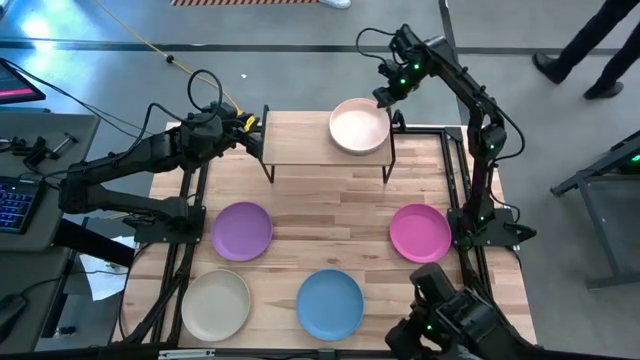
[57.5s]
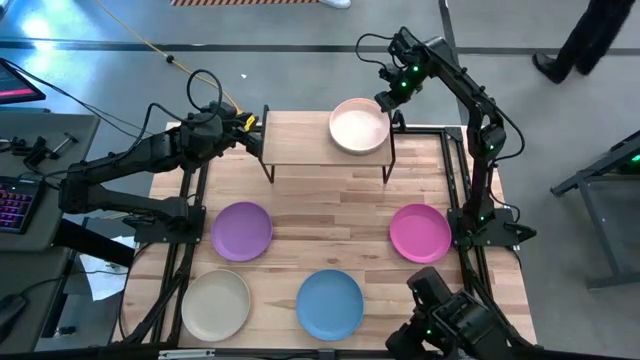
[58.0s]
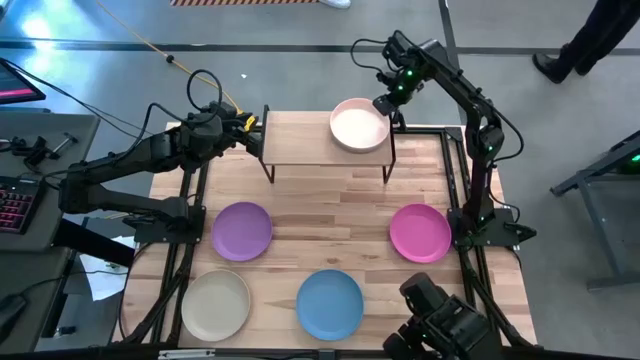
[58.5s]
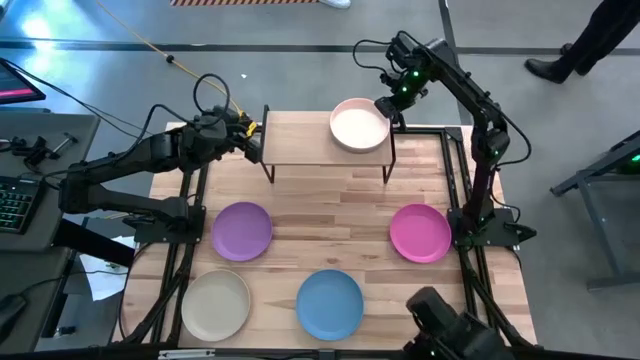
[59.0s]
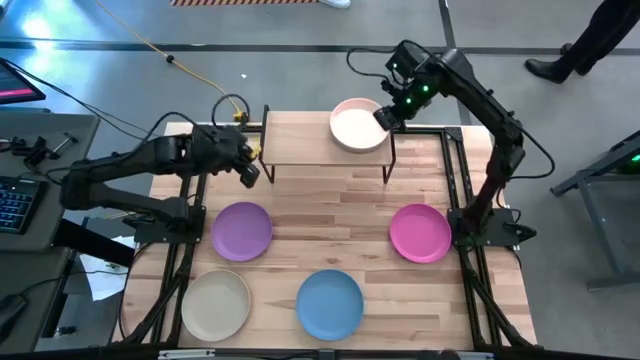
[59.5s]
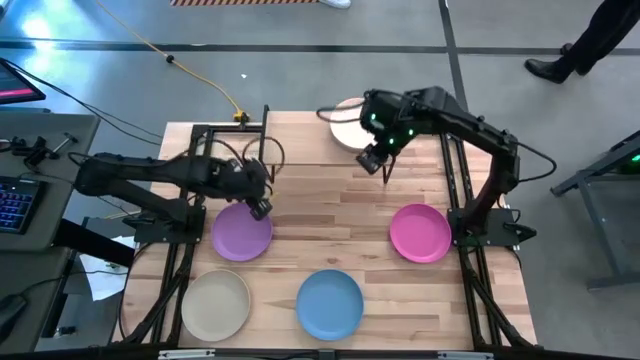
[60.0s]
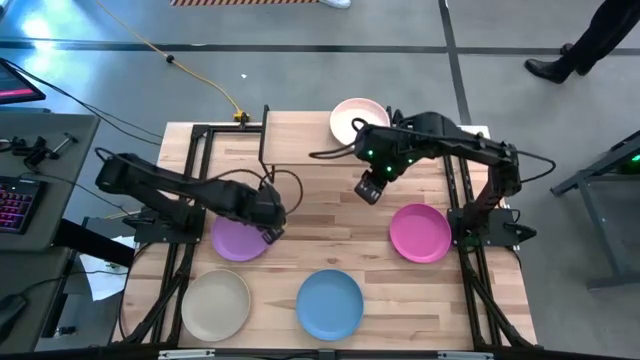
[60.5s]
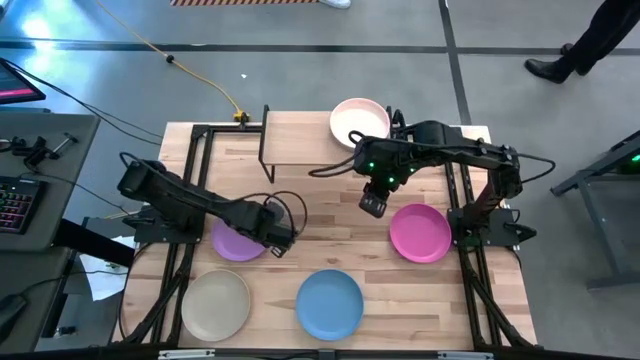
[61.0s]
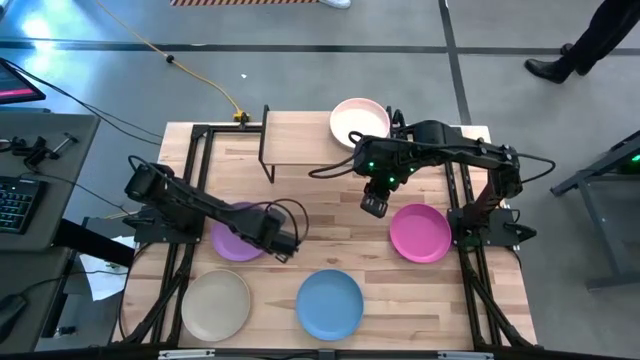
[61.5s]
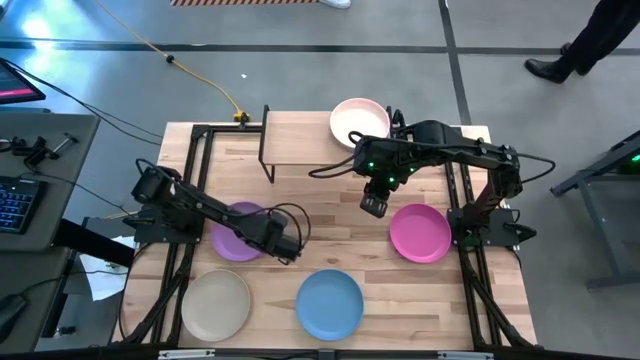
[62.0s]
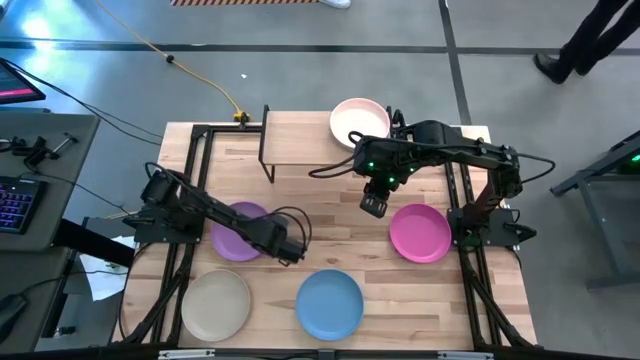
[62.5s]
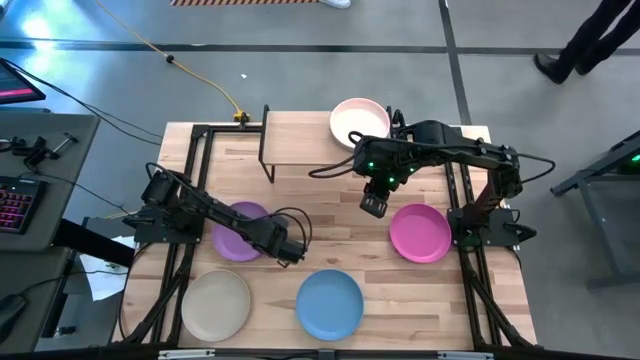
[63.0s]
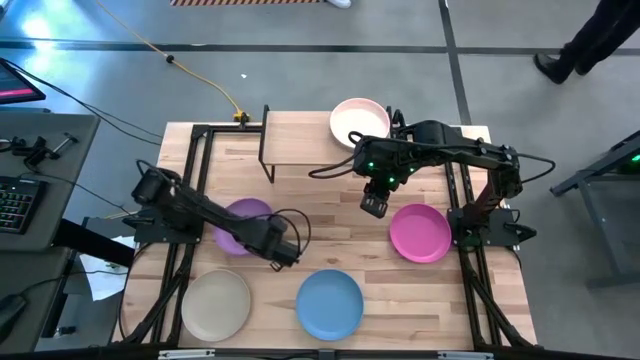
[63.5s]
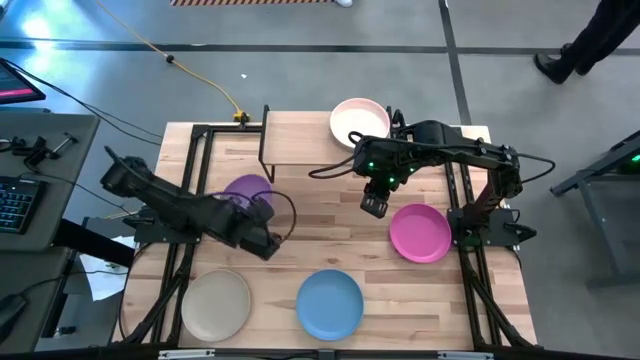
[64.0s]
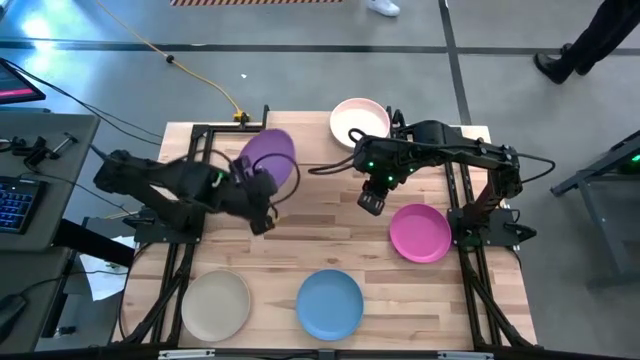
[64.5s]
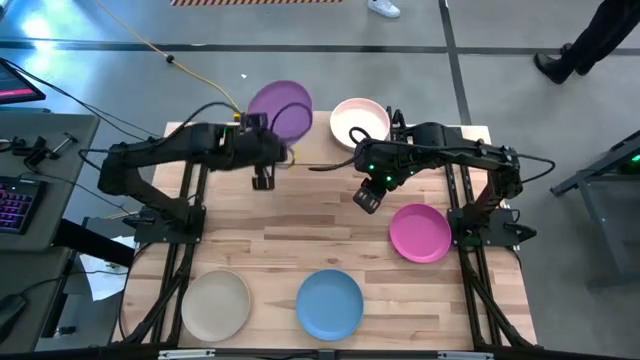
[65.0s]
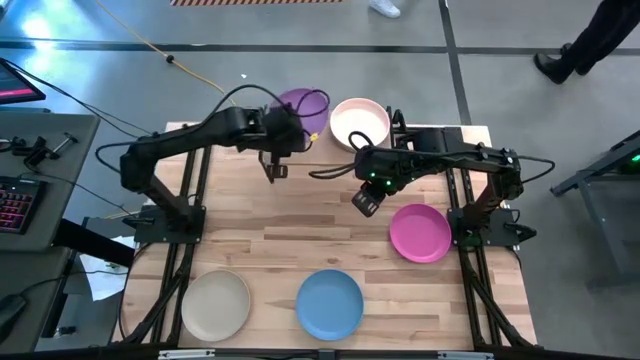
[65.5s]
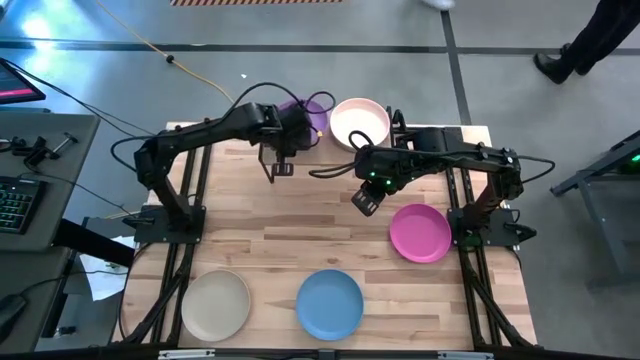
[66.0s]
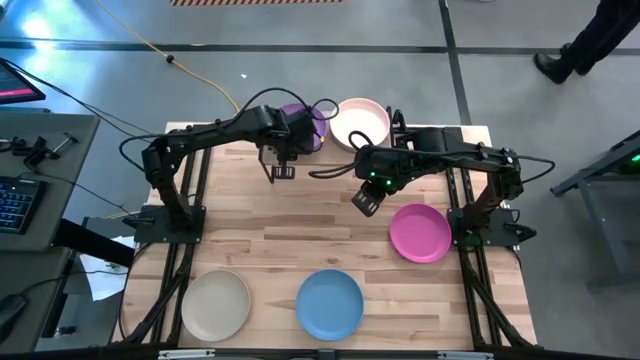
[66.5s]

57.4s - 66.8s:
Task: Place and stack plates onto a shelf
Put the purple plate on the shelf to the left of the piled plates

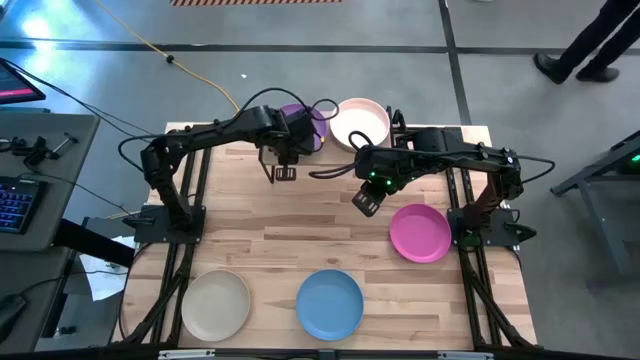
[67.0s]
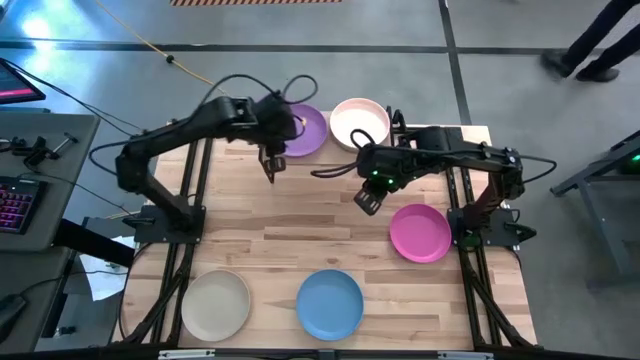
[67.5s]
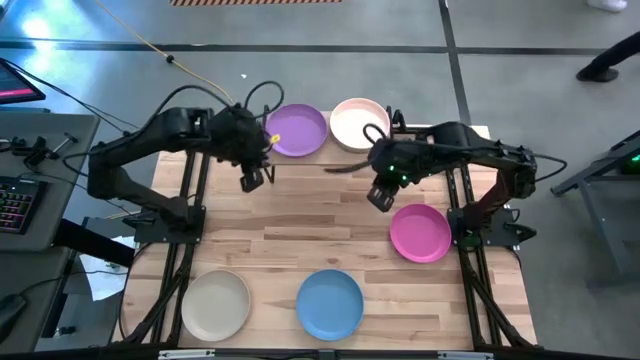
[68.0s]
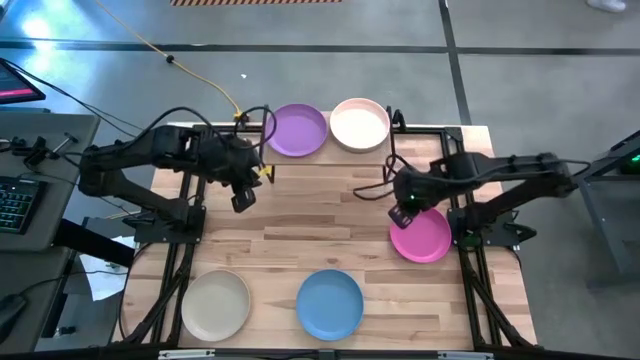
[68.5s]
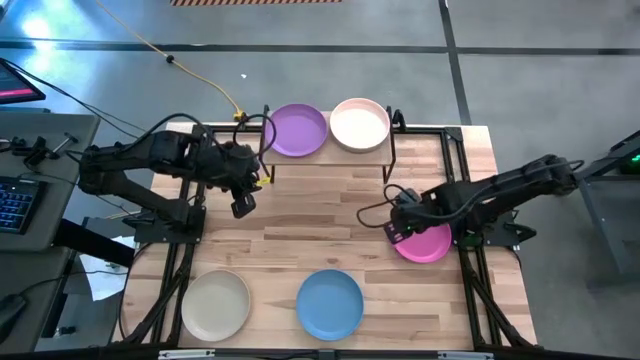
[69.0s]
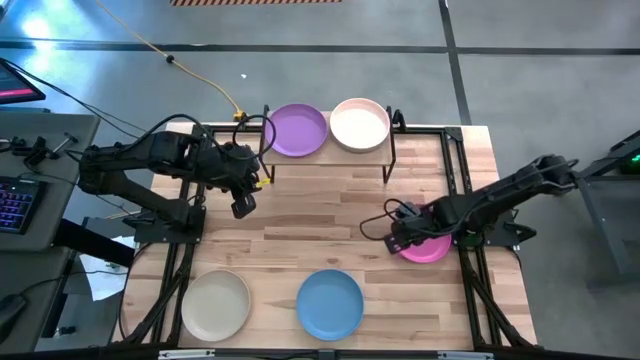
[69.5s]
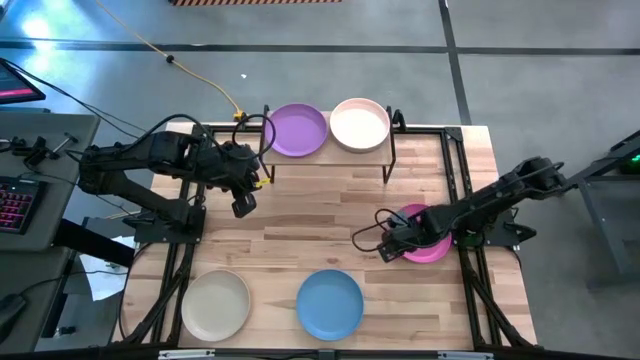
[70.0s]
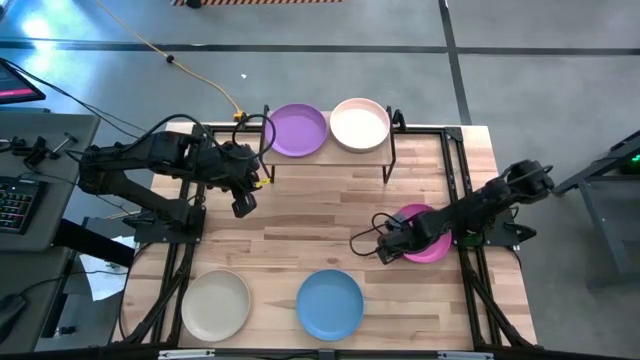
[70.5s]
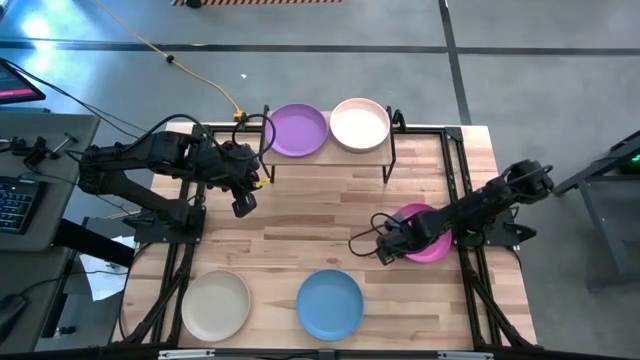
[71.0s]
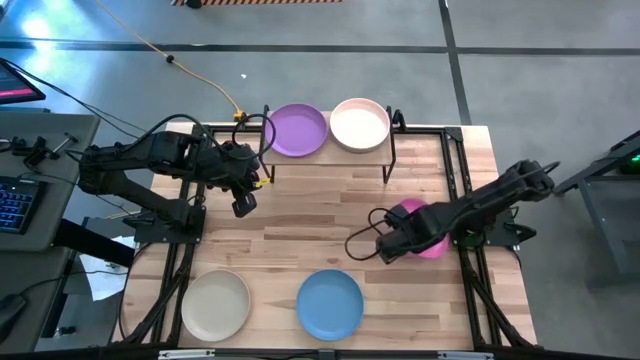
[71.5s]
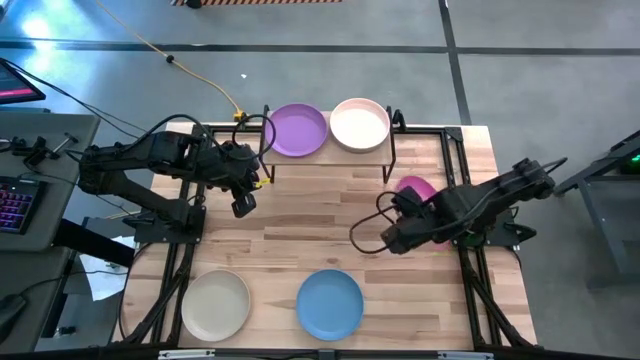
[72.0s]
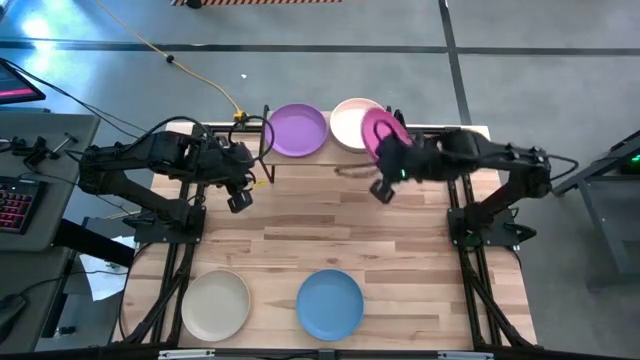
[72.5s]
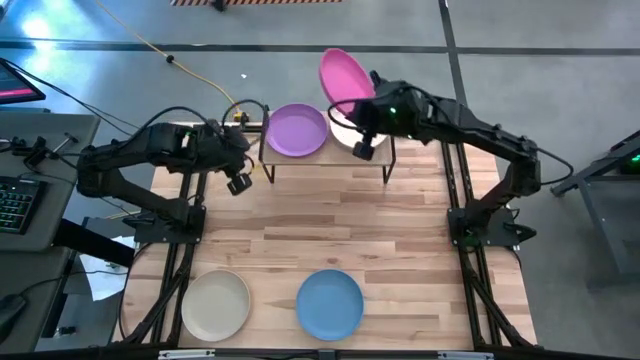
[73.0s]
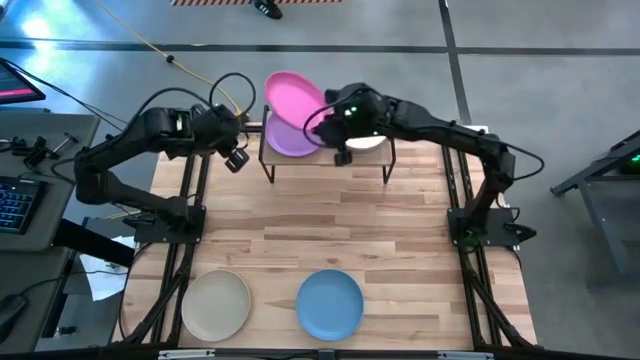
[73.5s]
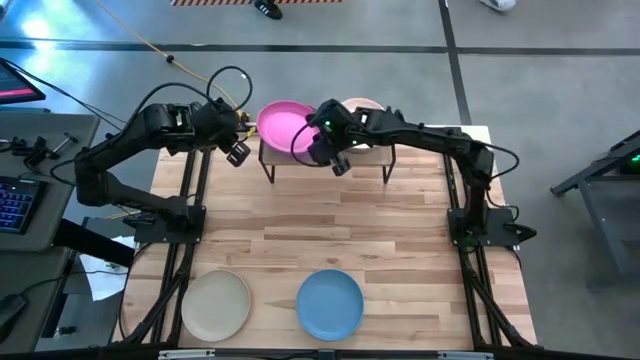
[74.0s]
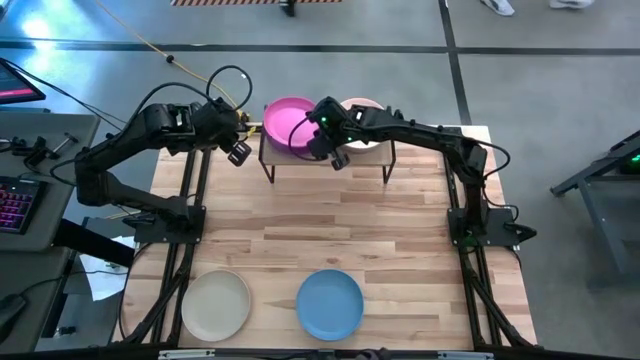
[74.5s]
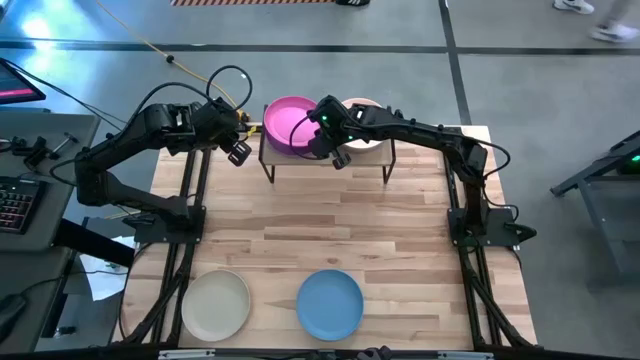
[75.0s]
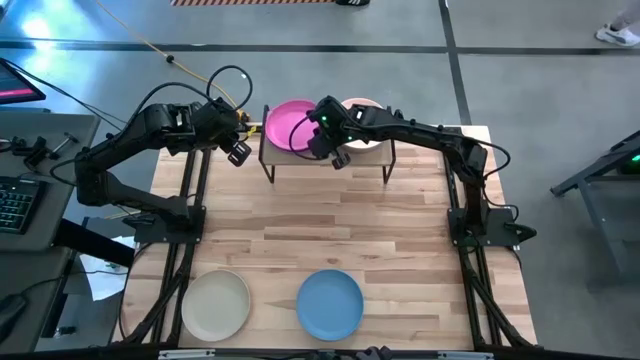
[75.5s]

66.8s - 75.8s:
Stack the pink plate on top of the purple plate on the shelf

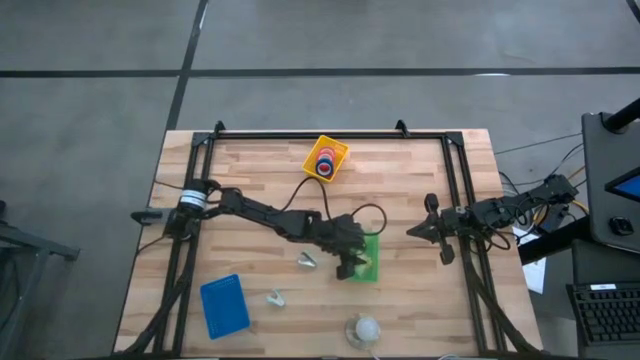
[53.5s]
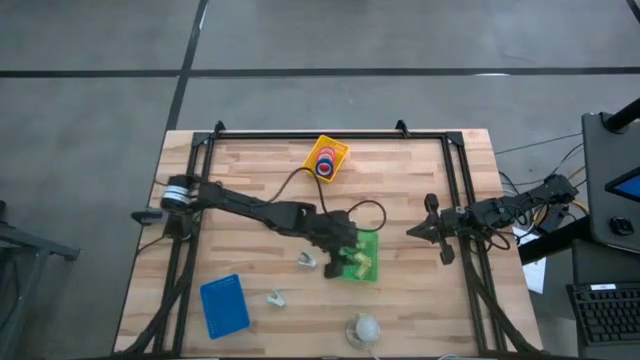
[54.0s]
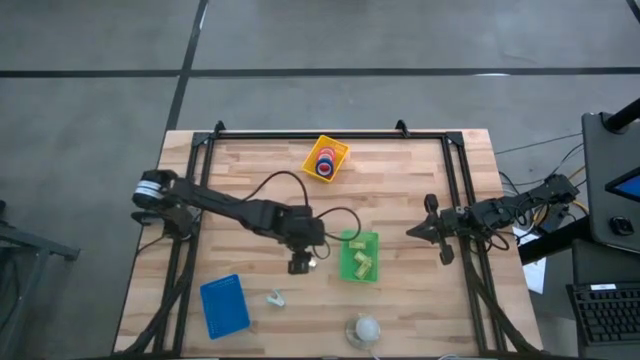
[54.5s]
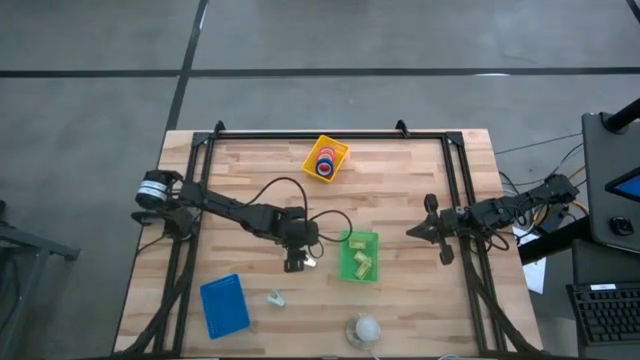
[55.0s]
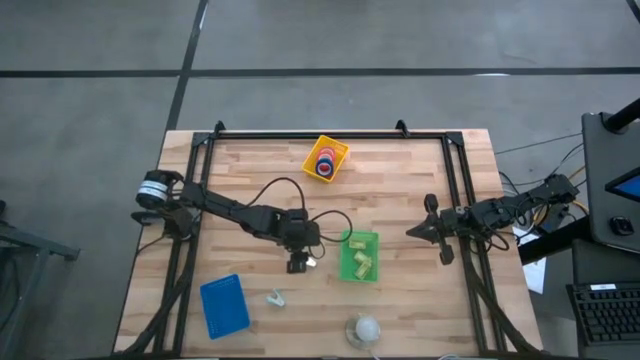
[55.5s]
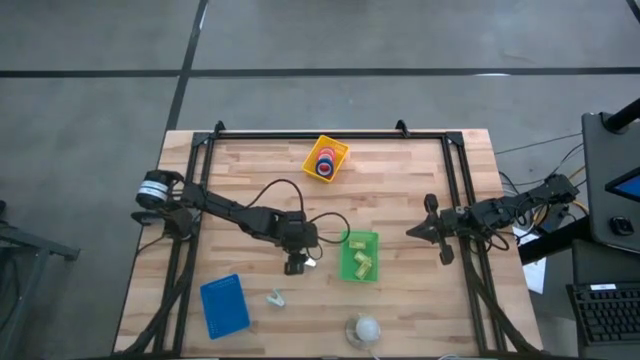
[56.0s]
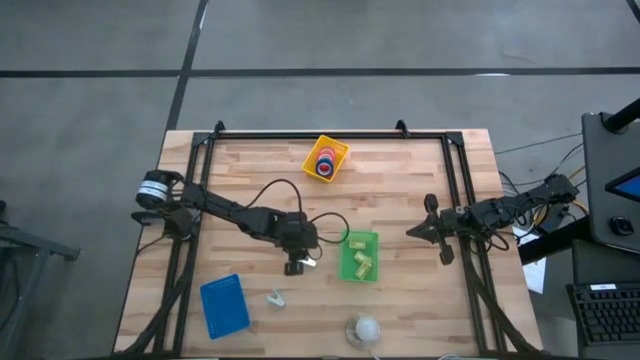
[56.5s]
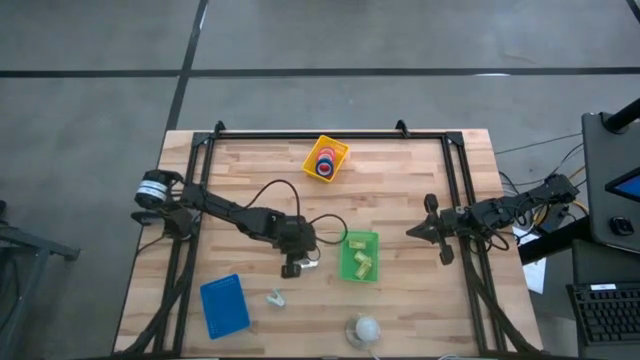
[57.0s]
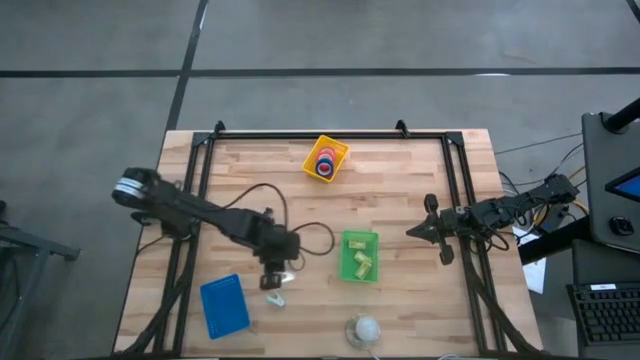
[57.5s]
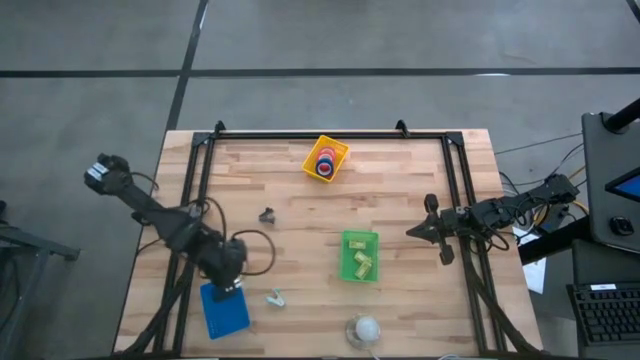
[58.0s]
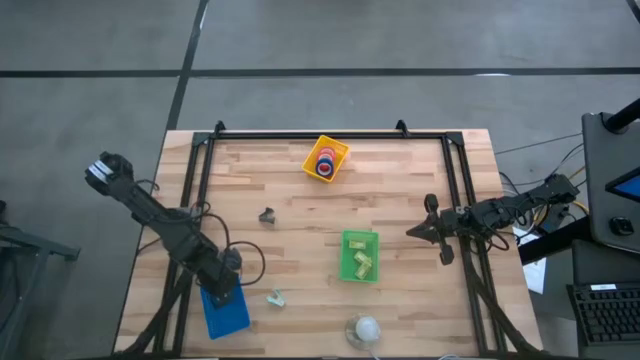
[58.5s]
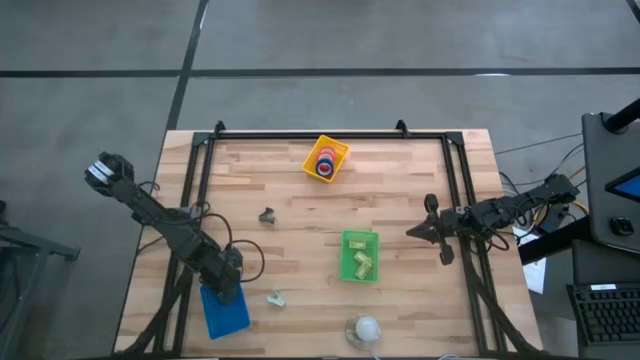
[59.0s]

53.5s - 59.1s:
Task: Pick and place Stapler, Stapler remover, tape
Put the right light blue stapler into the blue bin
